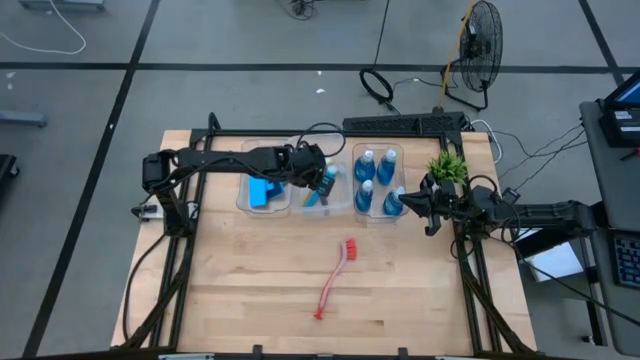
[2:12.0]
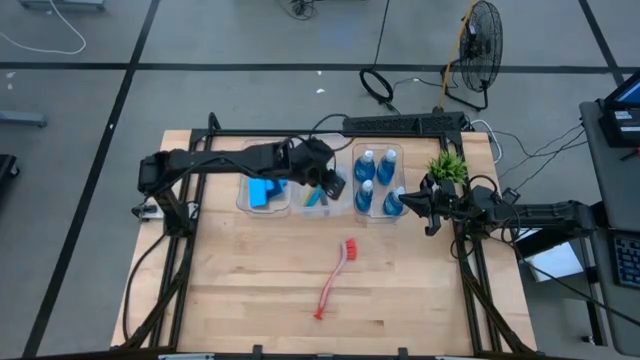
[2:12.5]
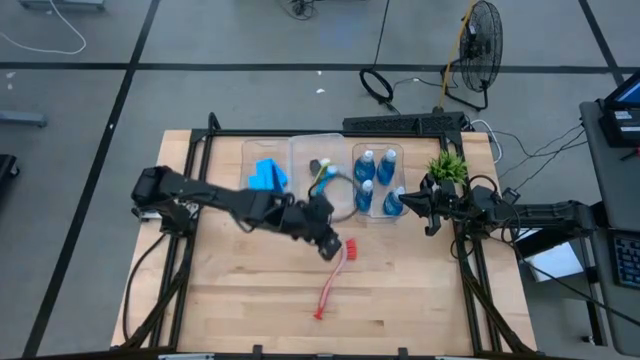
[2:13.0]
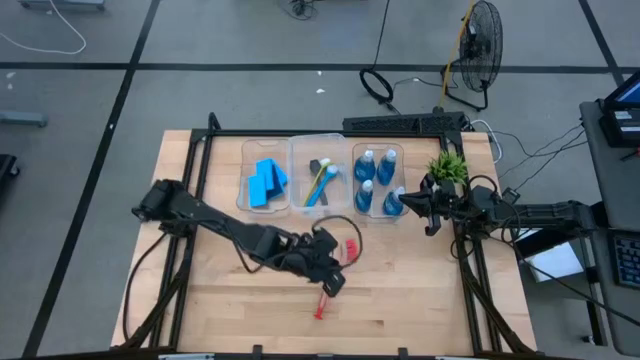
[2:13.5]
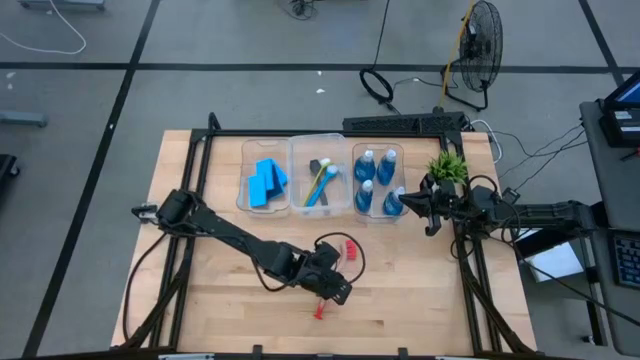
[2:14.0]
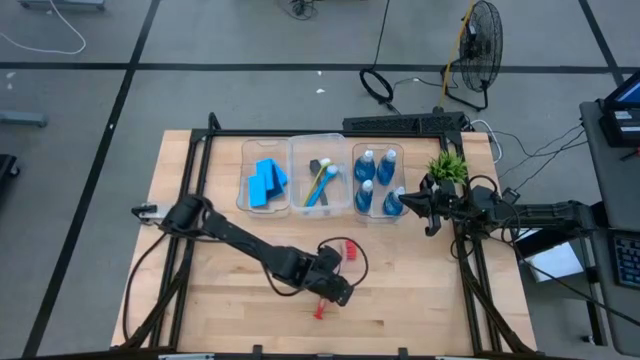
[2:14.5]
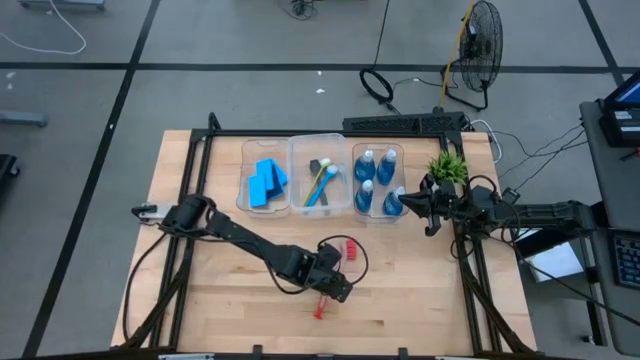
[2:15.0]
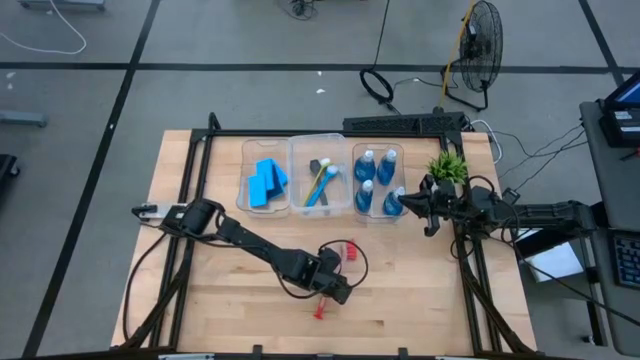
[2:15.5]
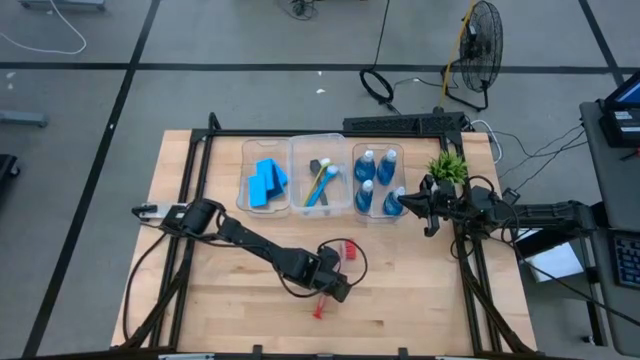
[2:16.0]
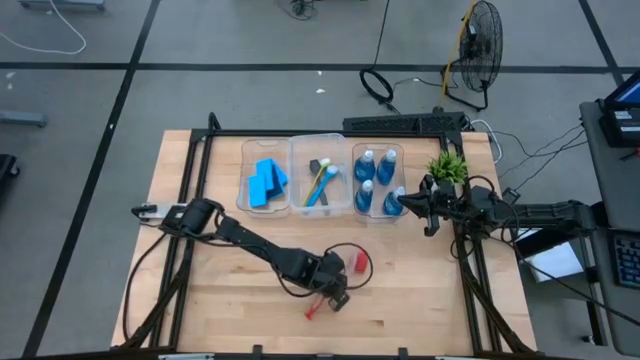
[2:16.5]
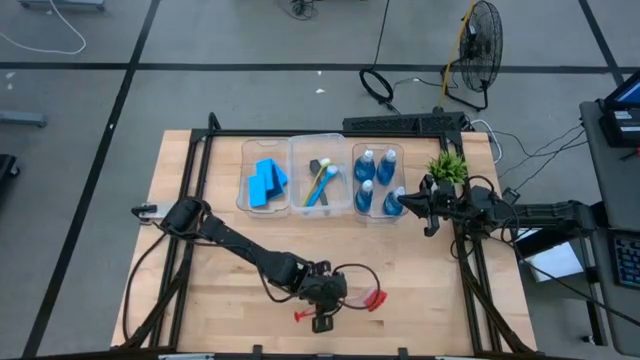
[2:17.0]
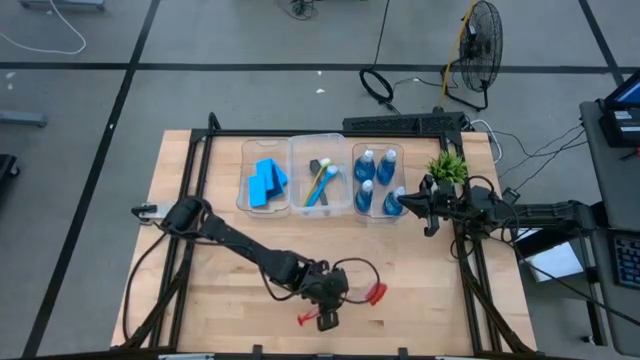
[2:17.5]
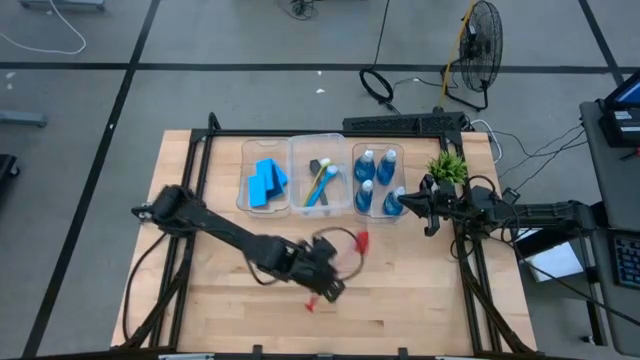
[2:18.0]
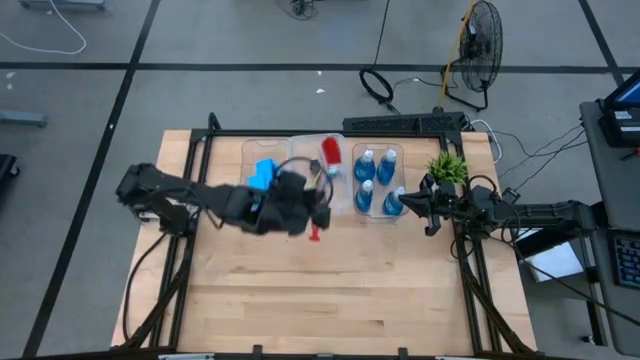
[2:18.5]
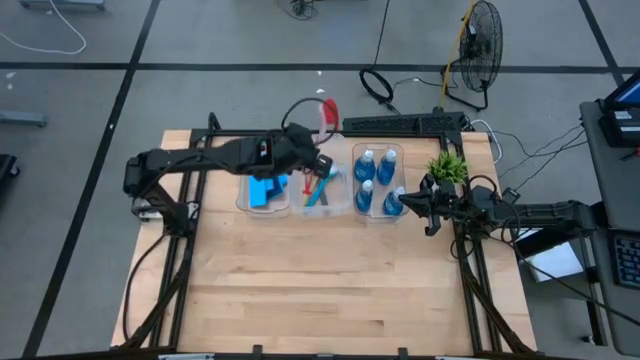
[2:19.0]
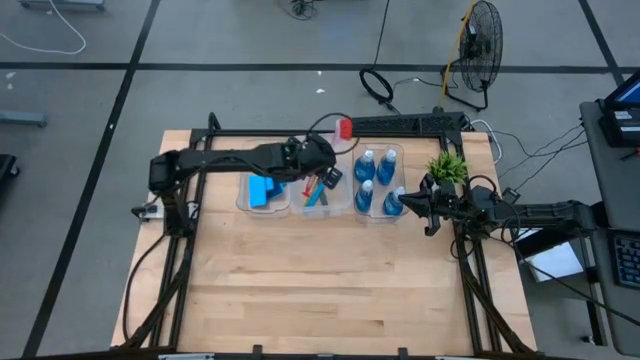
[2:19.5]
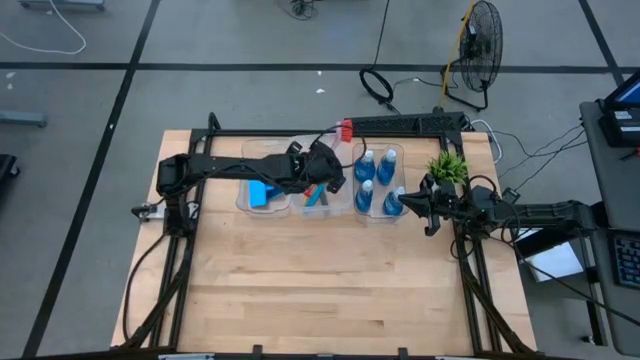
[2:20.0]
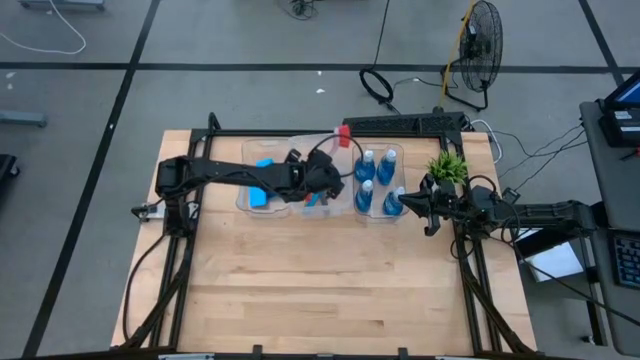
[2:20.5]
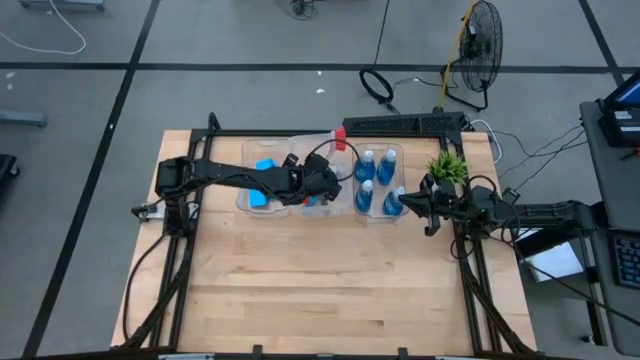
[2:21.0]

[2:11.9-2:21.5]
Task: Pick & Place Kitchen Sink Supplies
Put the orange dishwashing brush into the white bin

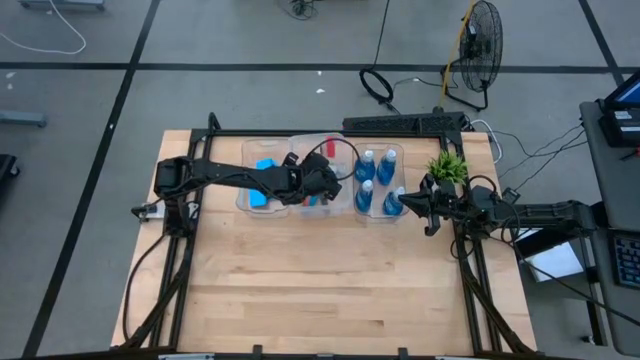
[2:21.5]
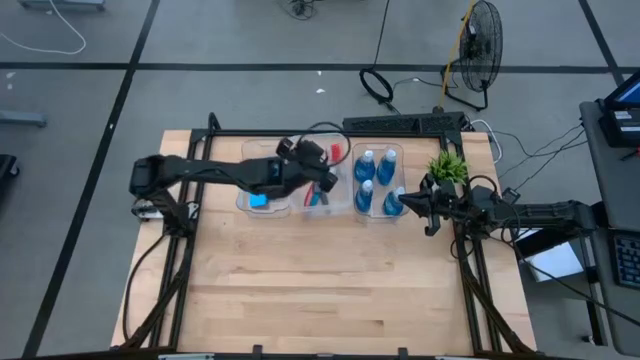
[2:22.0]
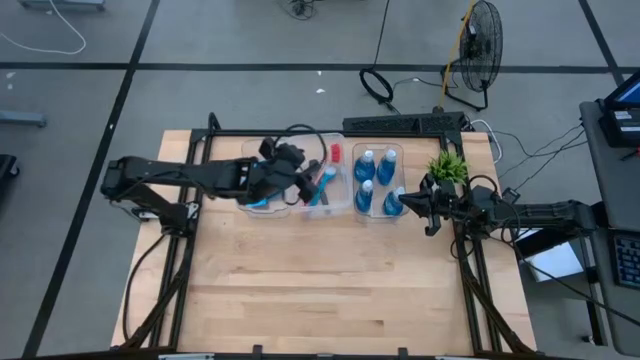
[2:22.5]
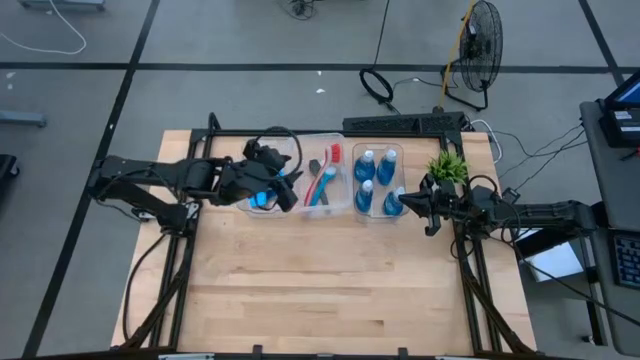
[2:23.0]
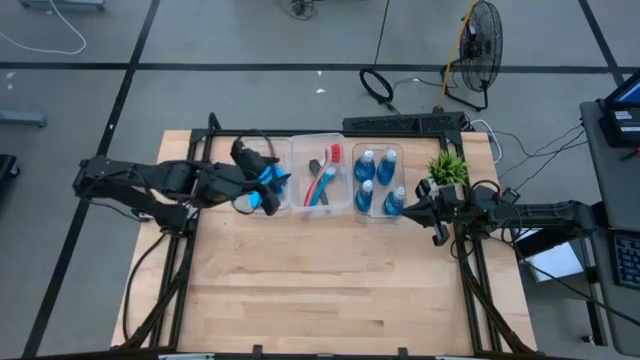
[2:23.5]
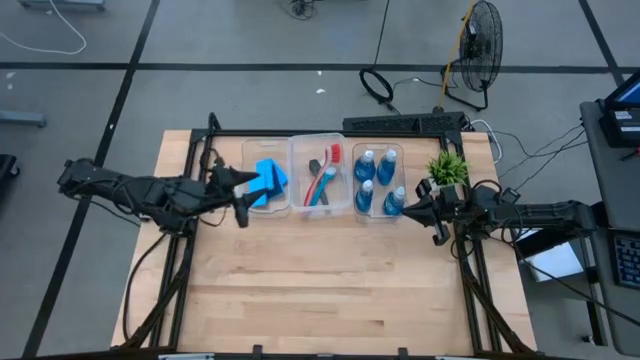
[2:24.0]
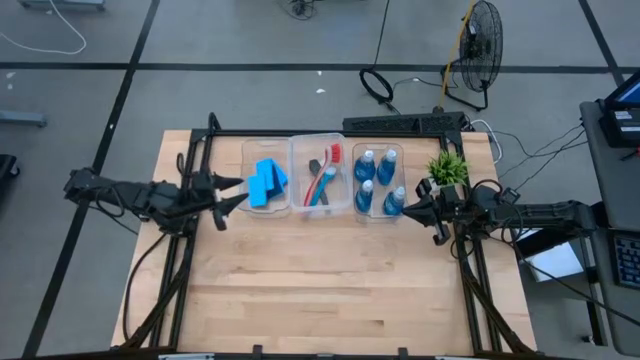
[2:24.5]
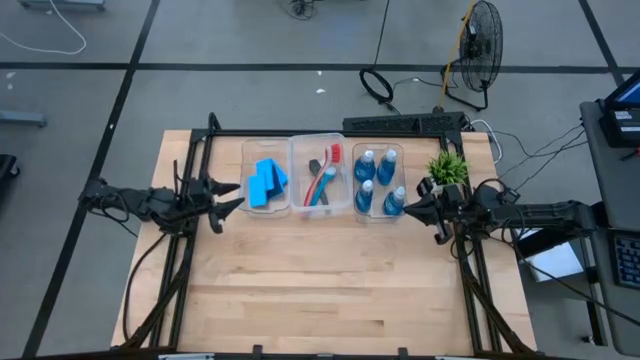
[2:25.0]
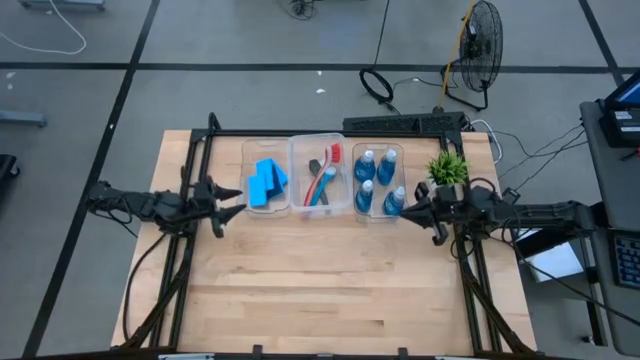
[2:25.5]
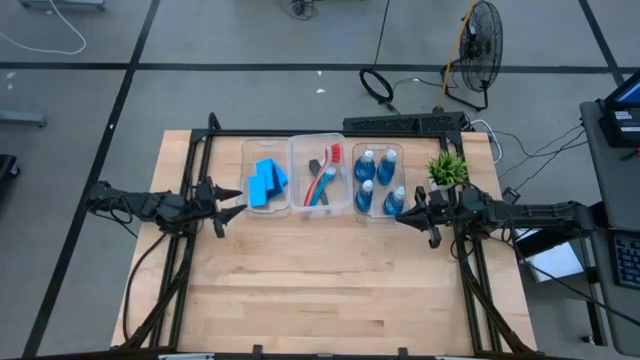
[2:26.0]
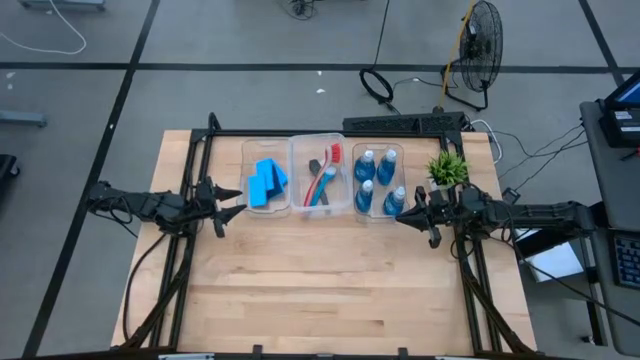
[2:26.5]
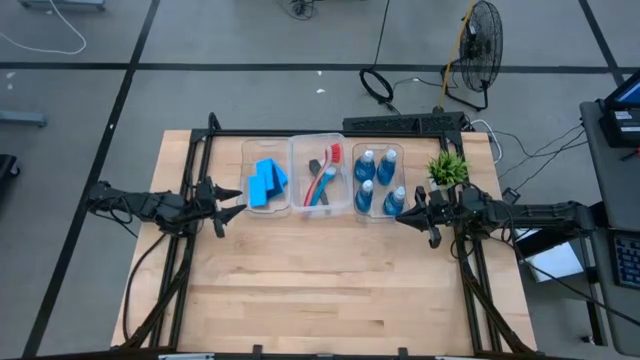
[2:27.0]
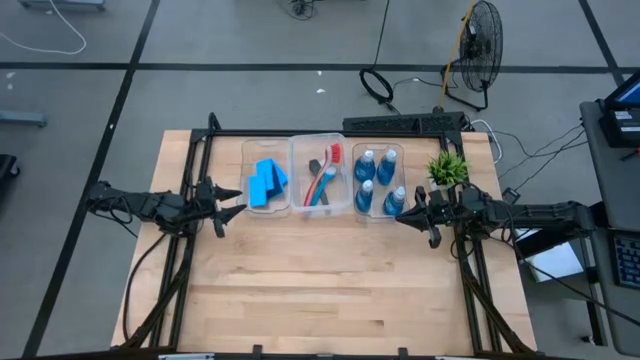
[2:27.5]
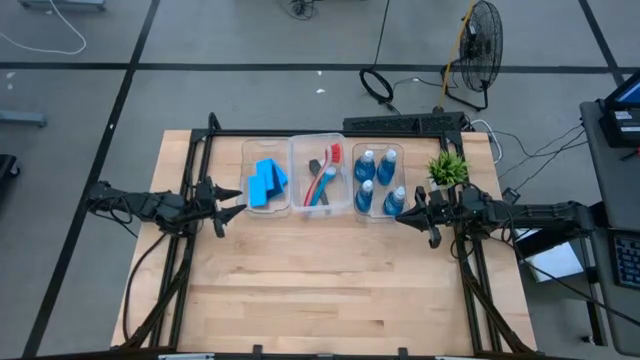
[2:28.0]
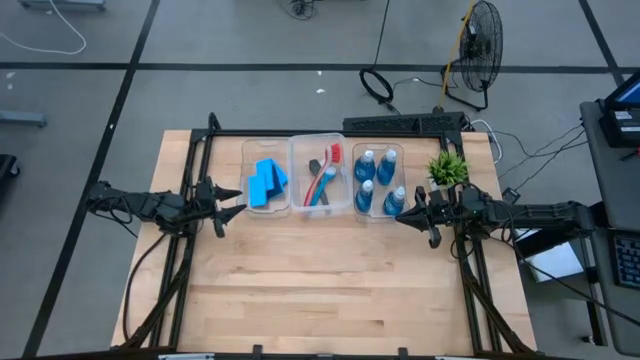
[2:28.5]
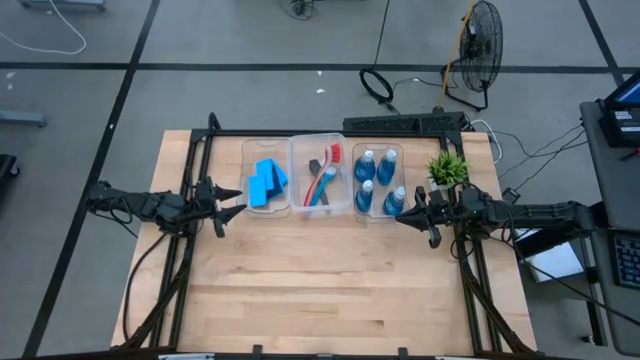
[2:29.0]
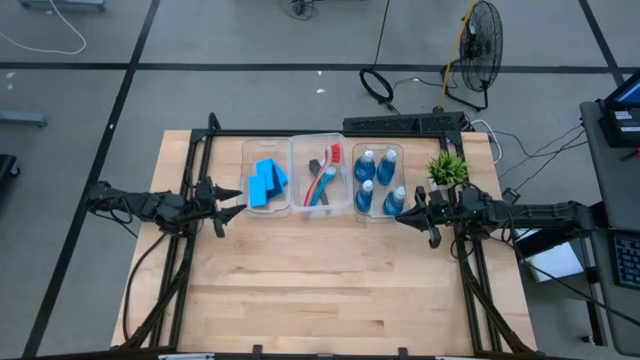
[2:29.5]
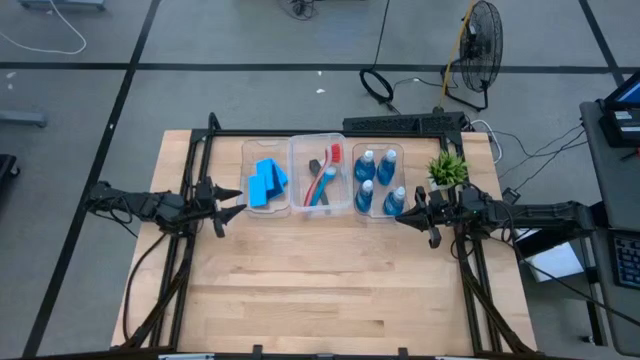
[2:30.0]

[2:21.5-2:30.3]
Return to home position
